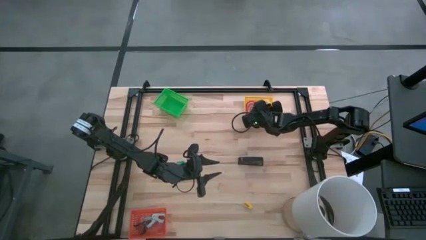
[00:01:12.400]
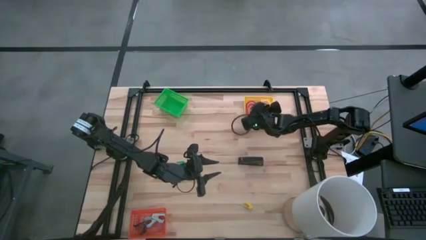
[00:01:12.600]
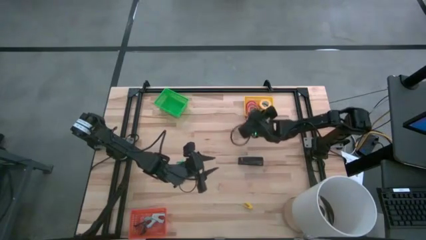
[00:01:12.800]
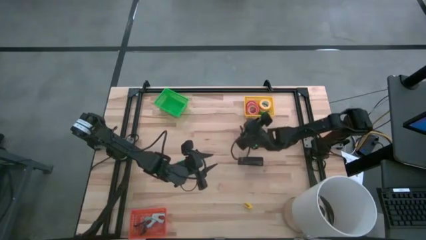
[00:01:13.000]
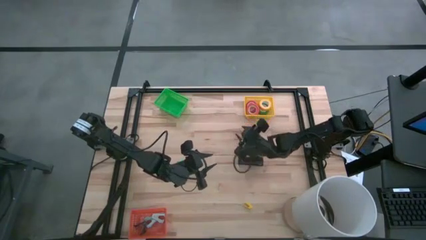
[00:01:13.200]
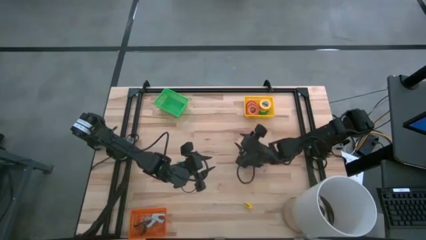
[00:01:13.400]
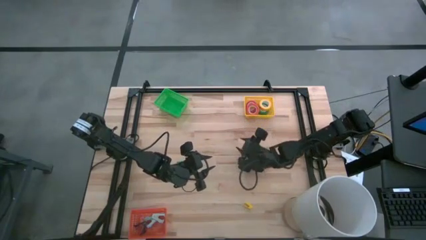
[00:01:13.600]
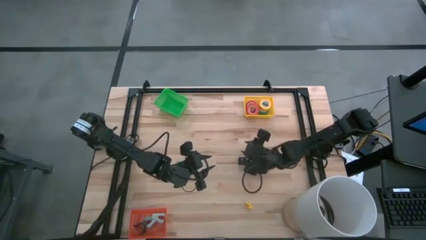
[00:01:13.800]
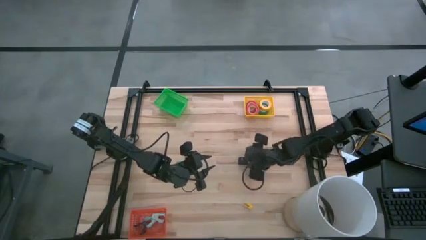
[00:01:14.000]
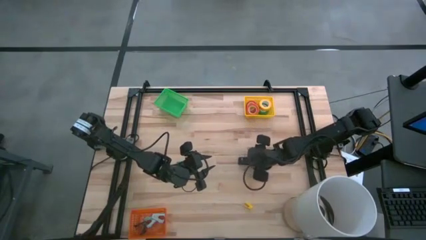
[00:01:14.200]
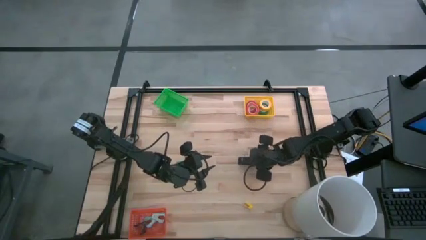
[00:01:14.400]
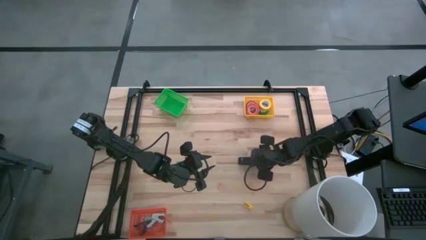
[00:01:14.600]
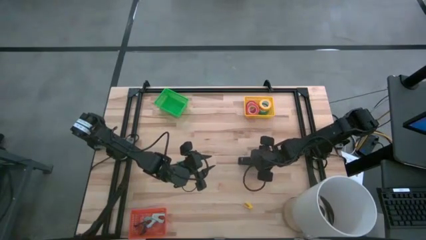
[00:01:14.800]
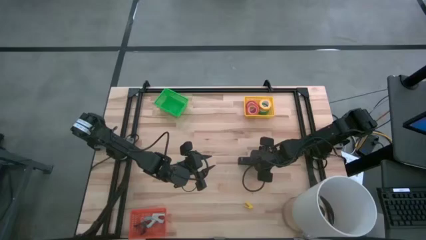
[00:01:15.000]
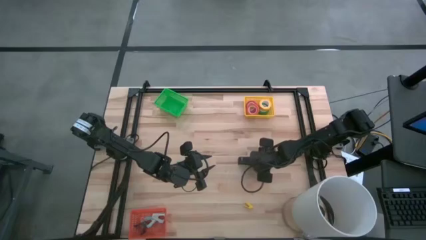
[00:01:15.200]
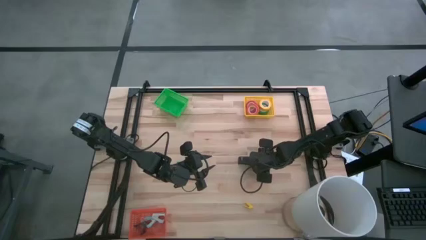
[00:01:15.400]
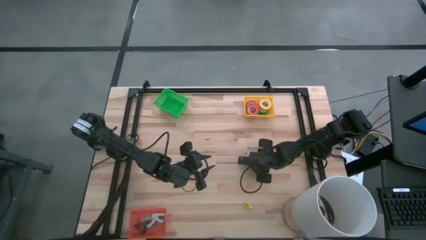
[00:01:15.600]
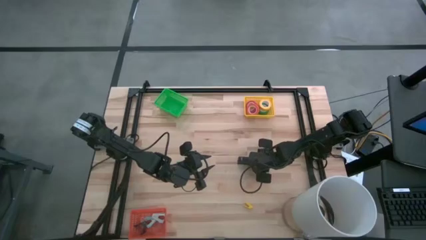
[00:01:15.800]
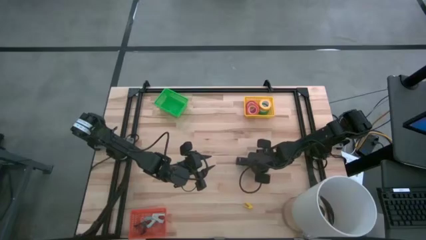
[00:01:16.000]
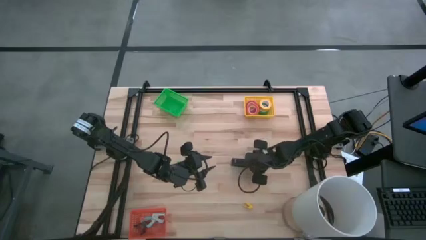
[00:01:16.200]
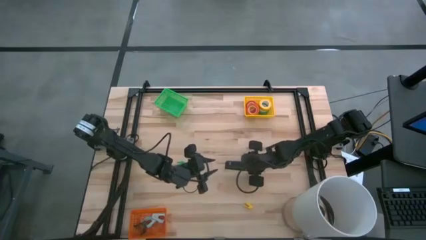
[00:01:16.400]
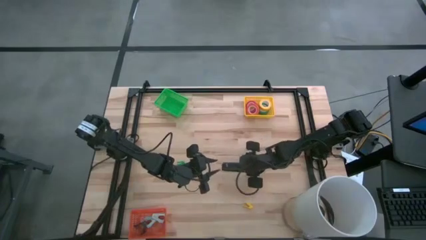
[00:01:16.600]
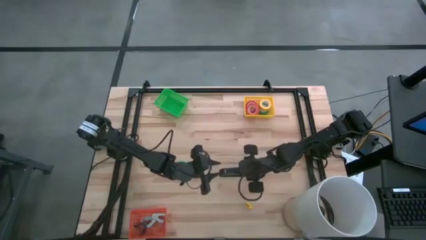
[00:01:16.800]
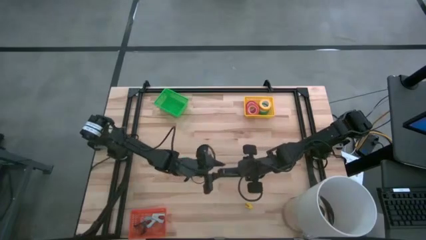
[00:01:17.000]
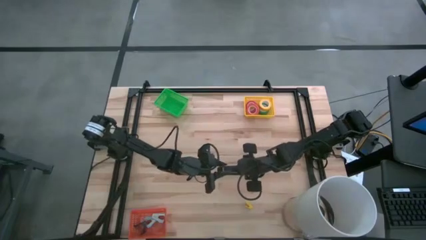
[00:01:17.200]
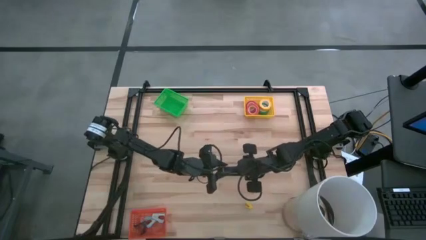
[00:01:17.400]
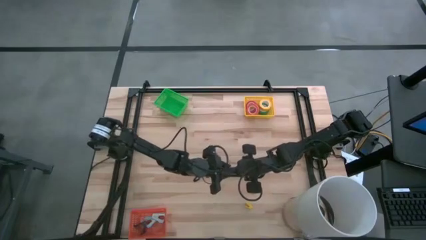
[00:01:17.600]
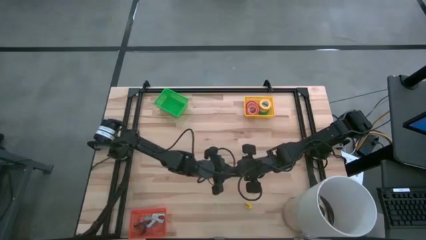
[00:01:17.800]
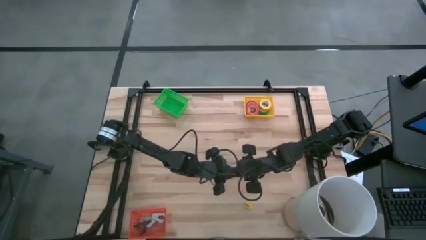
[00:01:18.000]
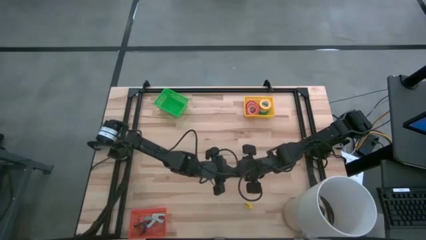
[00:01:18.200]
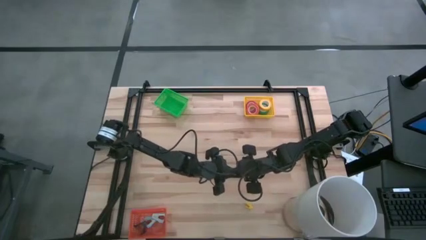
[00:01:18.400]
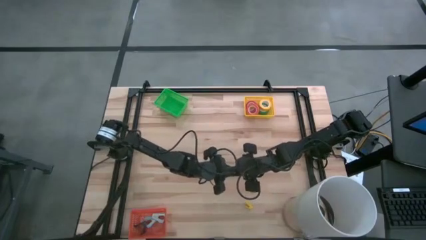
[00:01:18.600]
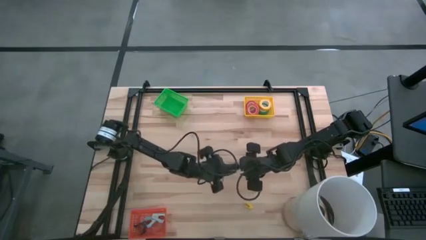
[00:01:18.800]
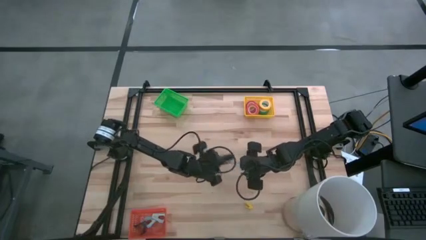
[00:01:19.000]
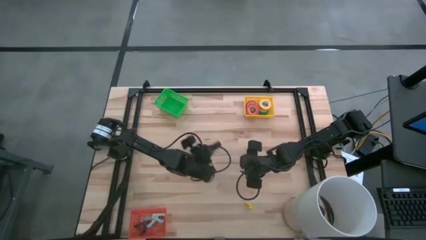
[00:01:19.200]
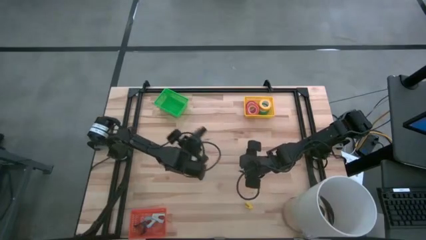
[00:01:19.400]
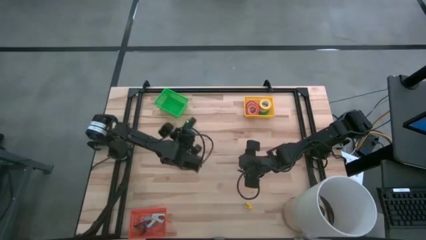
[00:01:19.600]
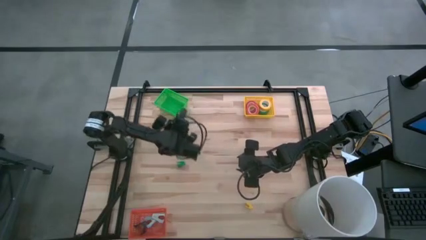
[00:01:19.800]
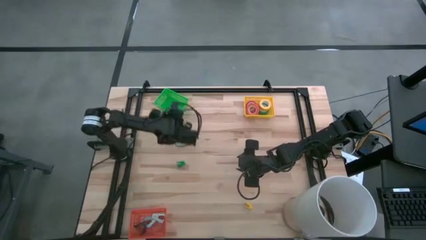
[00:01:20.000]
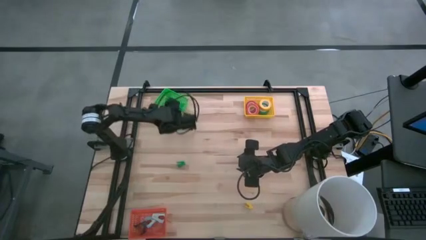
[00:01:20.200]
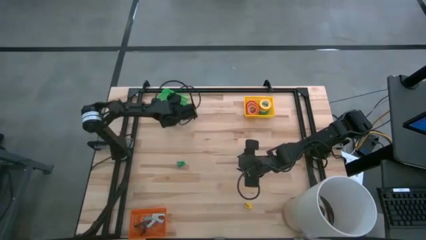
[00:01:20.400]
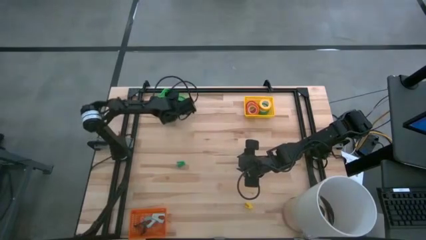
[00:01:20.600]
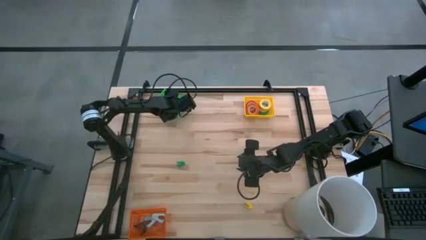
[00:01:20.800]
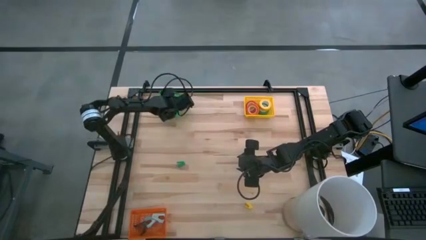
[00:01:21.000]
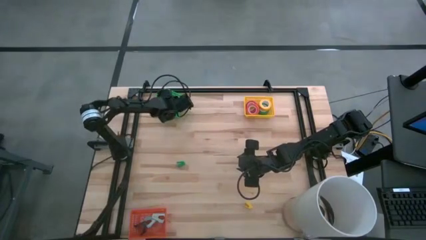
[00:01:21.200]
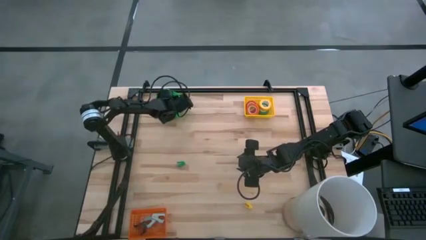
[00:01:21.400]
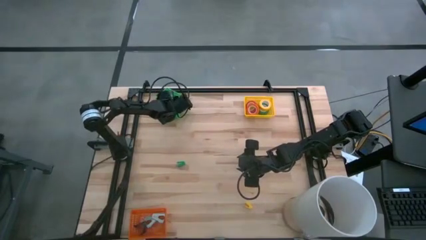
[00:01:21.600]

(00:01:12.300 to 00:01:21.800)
Task: Pick and place Stapler, Stapler remover, tape
Put the black stapler into the green bin

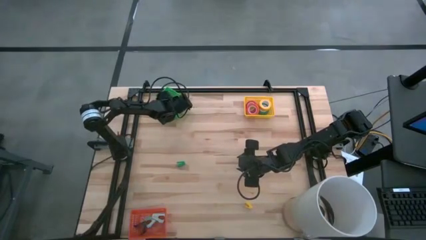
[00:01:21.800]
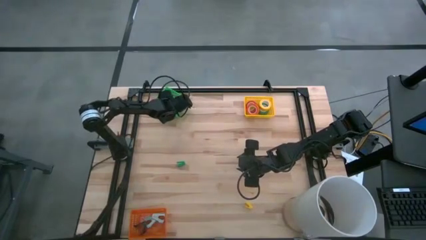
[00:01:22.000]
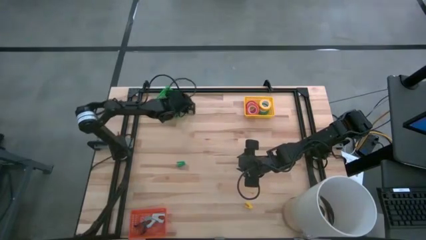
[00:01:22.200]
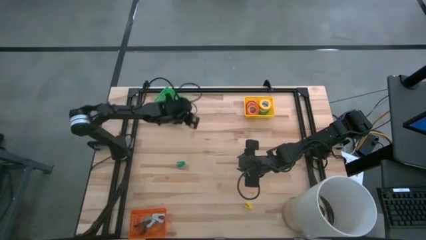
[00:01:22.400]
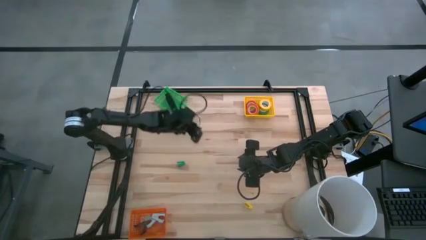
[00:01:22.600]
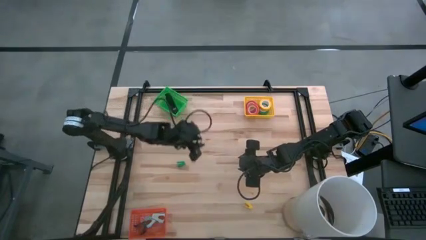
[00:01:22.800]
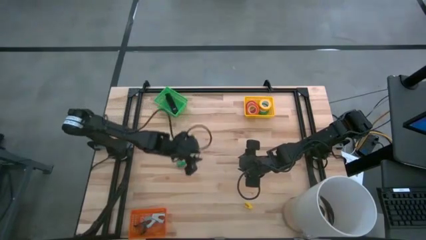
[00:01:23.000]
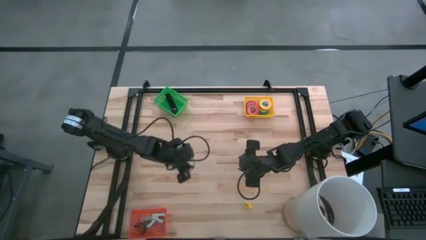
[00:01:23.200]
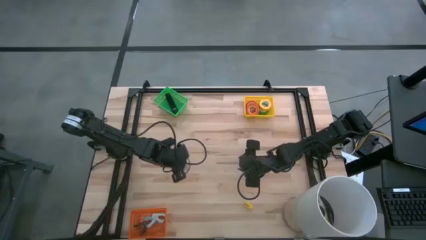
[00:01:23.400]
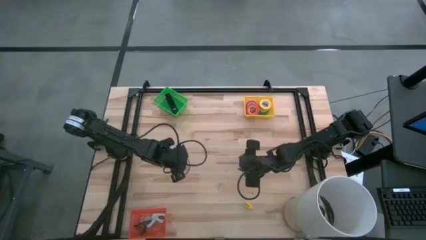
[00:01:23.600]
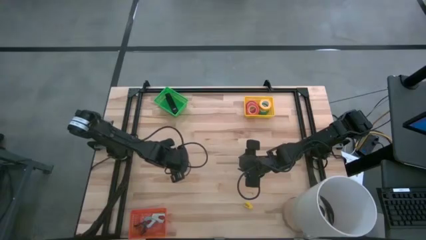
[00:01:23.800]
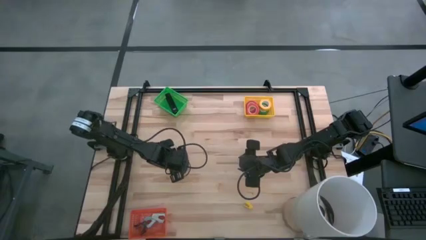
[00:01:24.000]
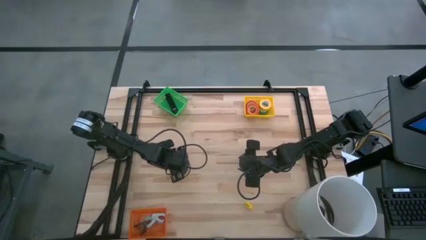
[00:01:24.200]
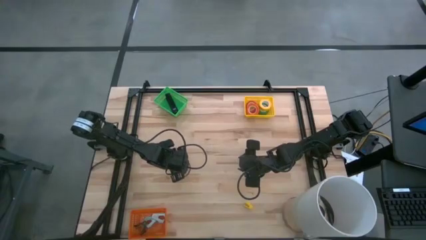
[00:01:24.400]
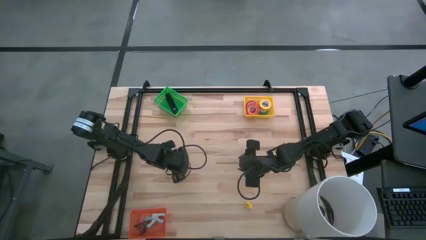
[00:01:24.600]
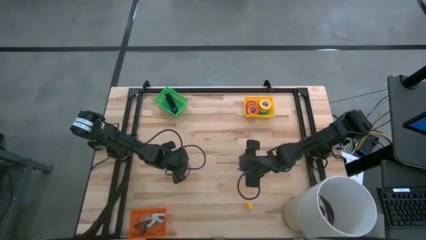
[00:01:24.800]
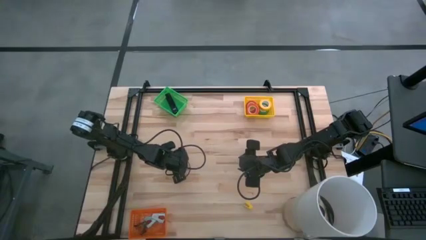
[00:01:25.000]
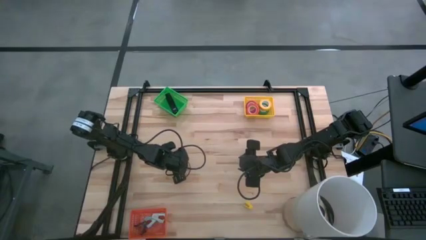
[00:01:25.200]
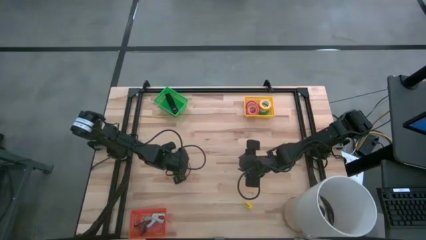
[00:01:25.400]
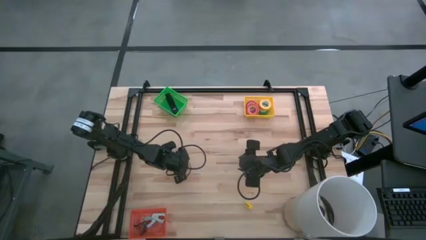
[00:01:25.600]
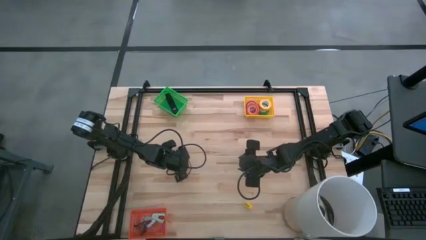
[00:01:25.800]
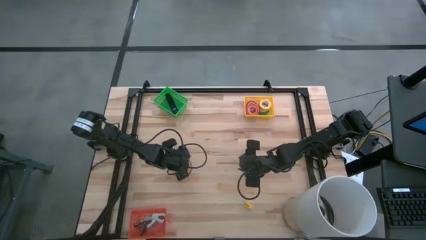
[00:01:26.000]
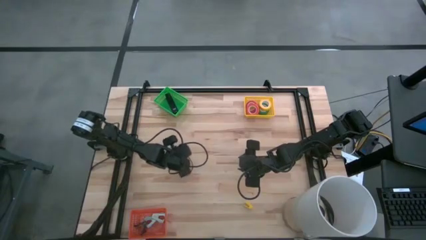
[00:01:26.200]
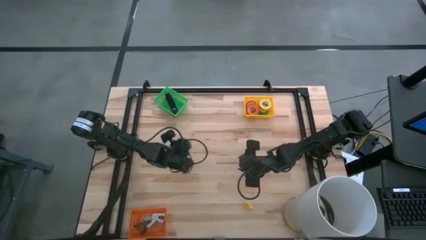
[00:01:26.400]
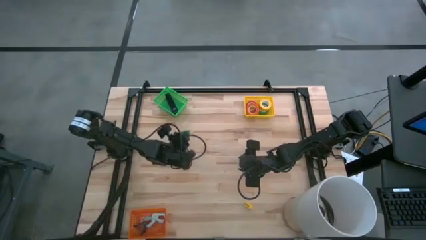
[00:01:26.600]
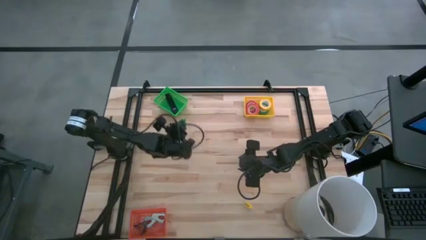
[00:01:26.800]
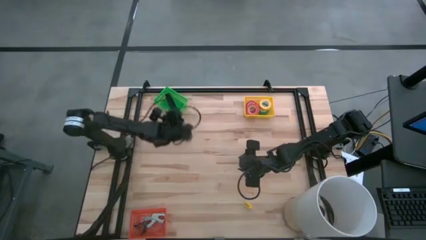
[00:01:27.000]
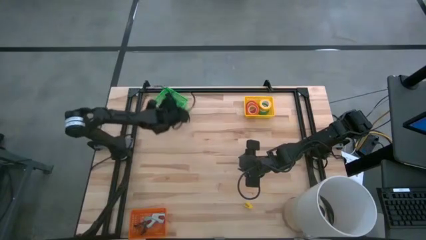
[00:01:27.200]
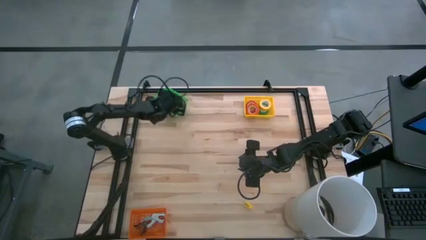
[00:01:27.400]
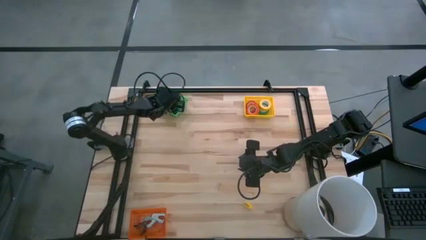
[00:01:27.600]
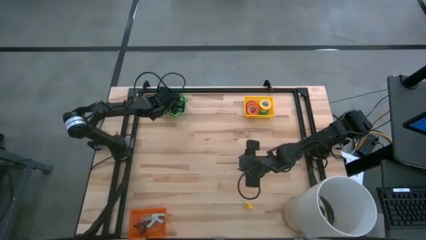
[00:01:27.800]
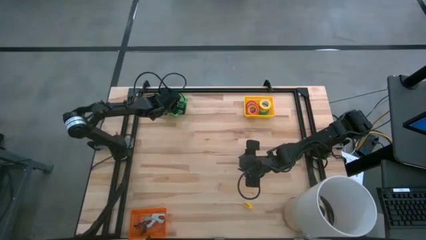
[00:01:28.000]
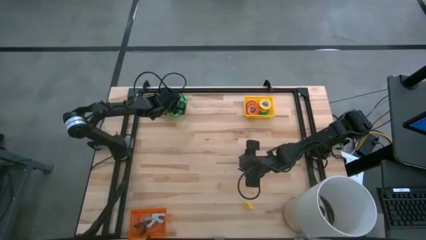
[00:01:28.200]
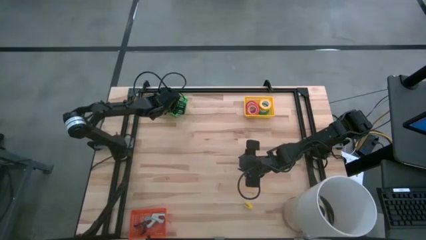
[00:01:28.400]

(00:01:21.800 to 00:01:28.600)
Put the green stapler into the green bin

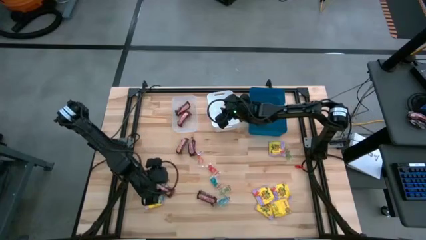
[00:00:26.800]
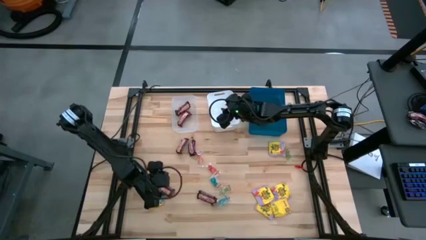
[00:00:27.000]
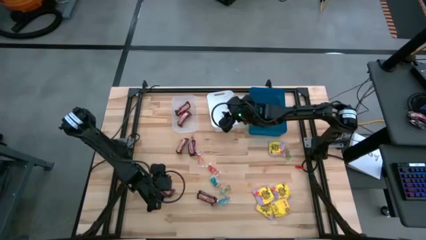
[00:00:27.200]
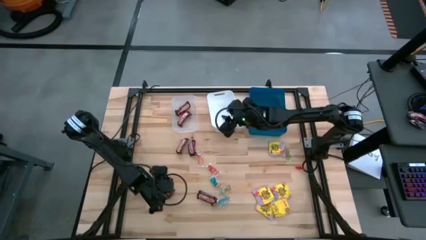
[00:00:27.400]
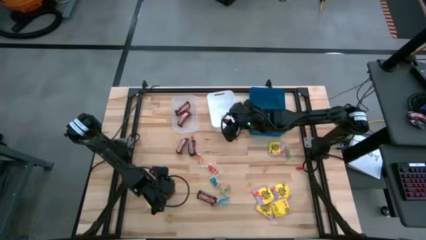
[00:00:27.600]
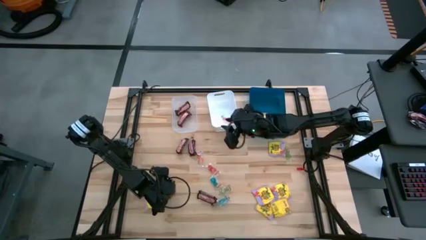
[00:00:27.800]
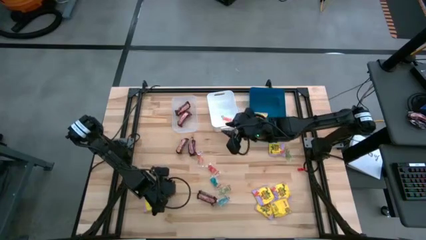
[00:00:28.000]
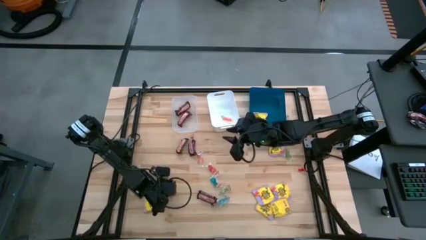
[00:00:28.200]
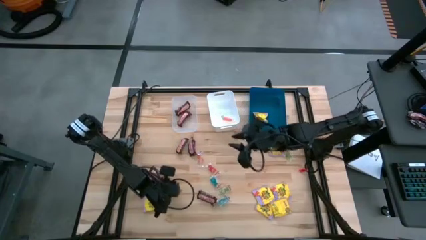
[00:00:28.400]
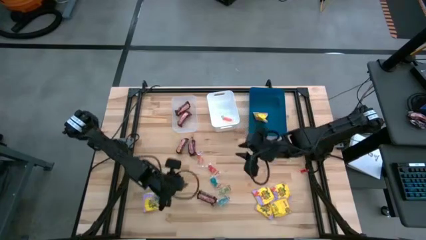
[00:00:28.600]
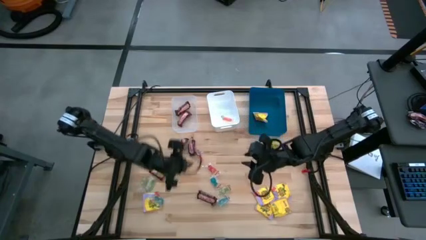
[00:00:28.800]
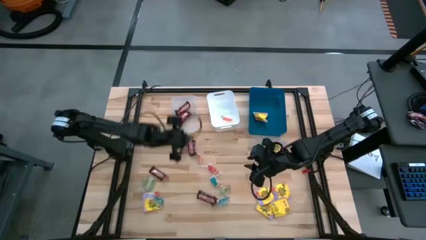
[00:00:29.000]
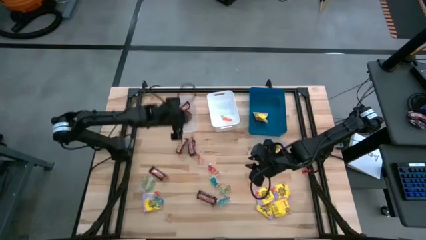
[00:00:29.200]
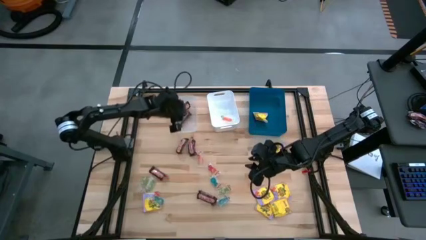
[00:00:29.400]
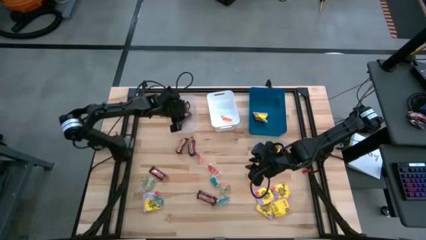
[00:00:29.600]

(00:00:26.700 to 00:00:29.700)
Task: Sort candy
Put the bottom left brown candy bar into the transparent bin
